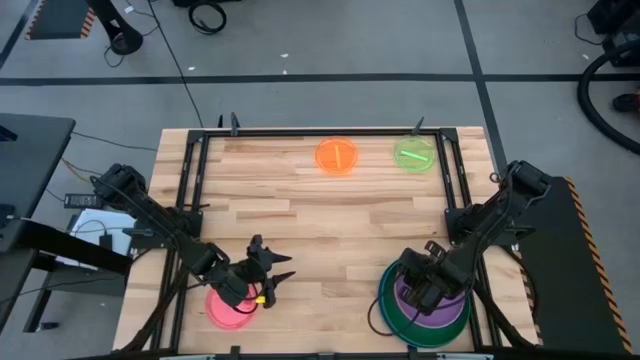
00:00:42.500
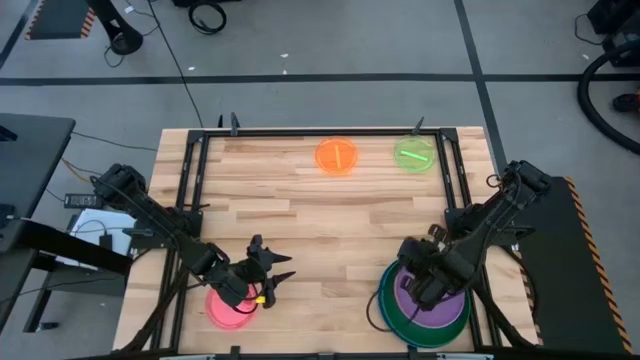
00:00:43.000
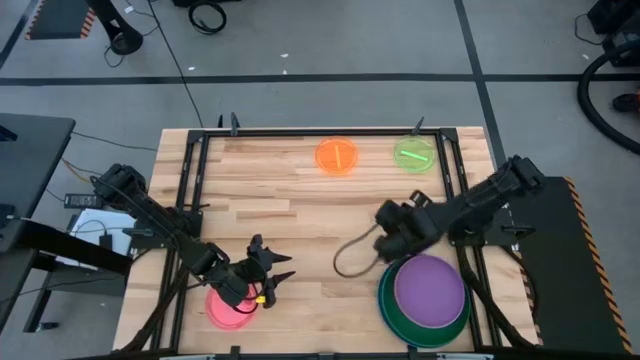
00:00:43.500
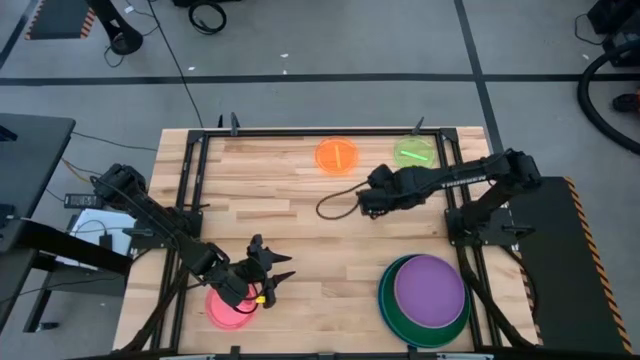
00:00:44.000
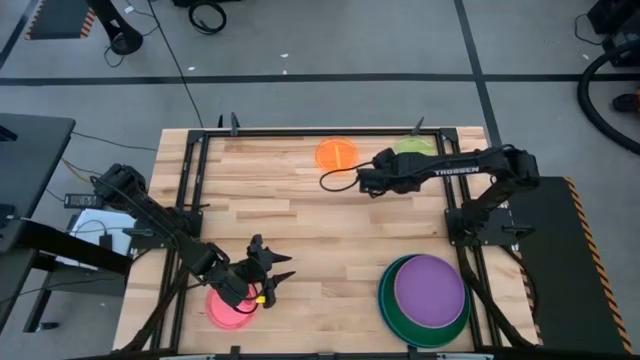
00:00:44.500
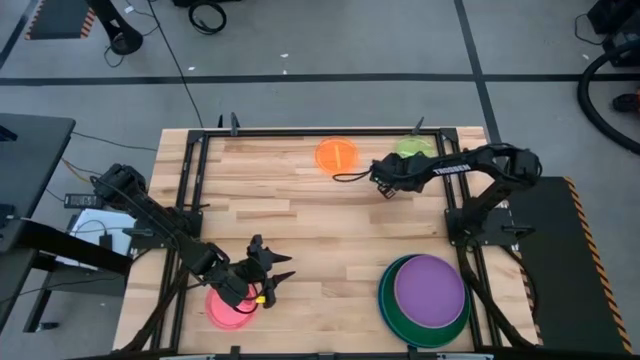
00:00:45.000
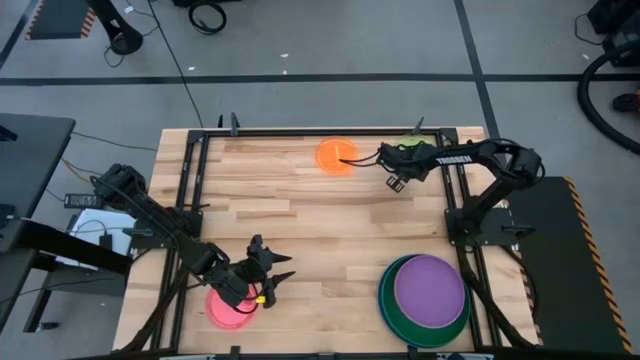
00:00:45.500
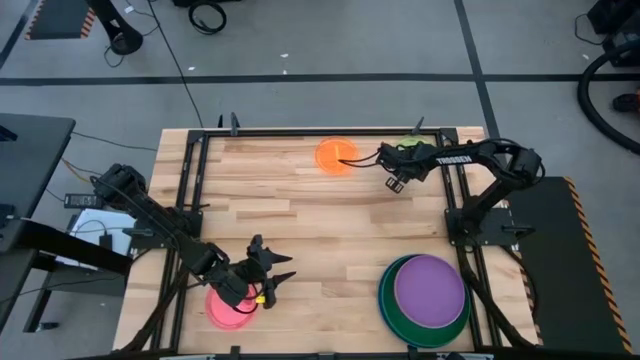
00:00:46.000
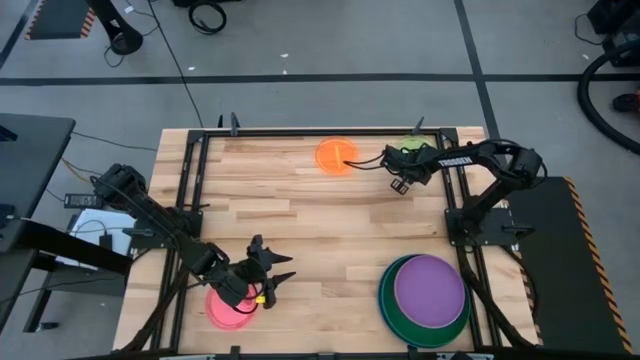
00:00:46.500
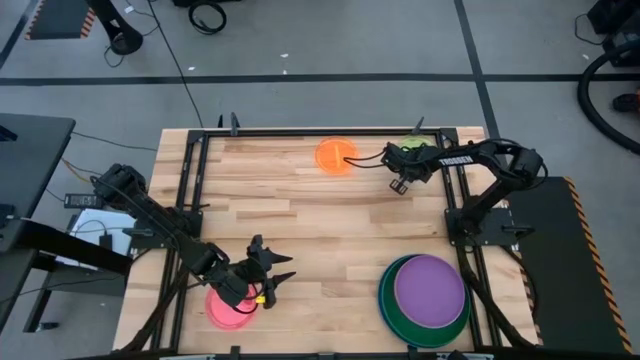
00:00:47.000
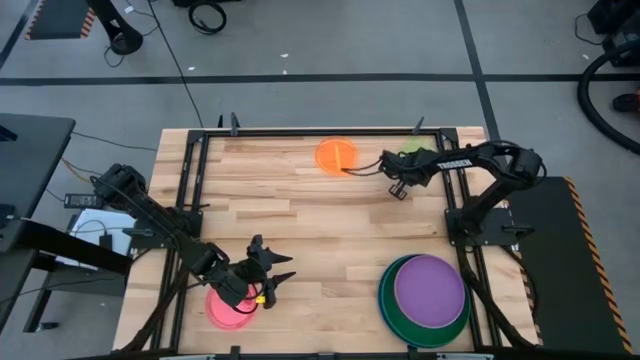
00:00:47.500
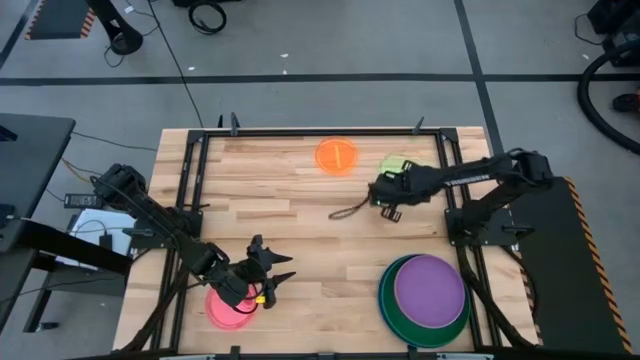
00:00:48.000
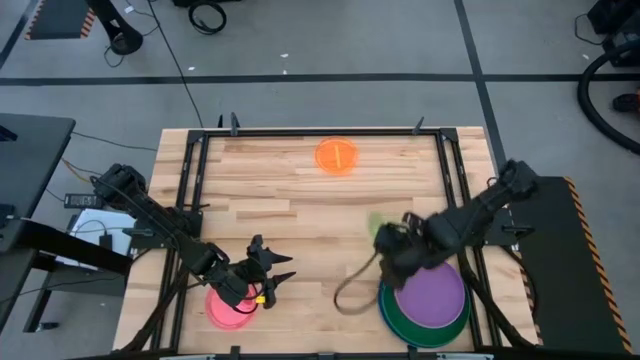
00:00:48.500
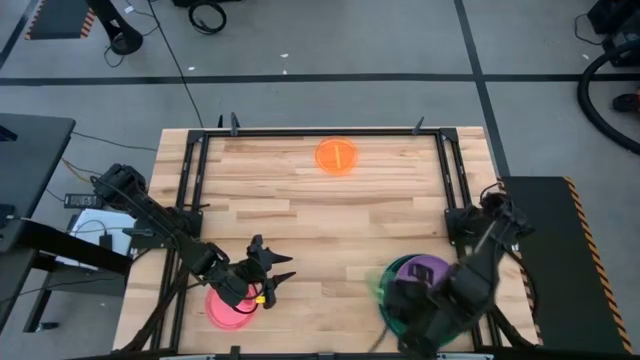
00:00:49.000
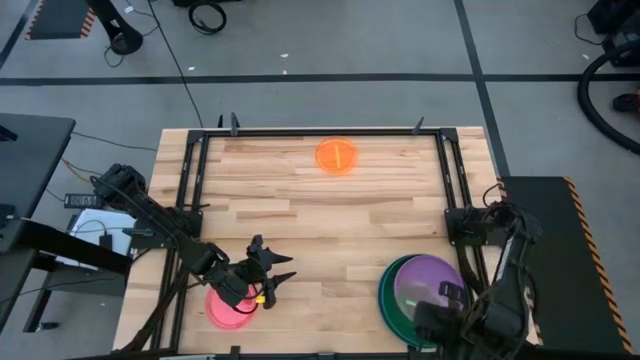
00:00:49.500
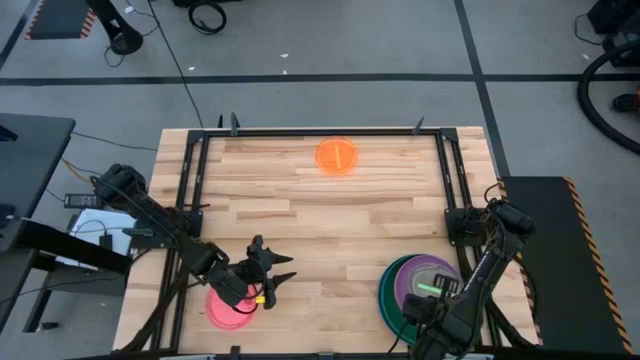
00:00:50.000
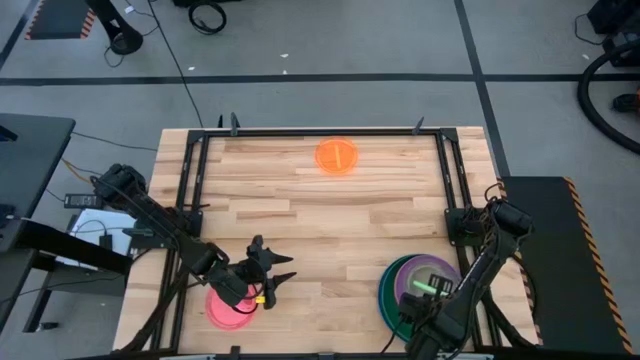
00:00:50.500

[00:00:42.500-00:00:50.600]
Task: Stack plastic plates
Stack the light green plate on top of the purple plate

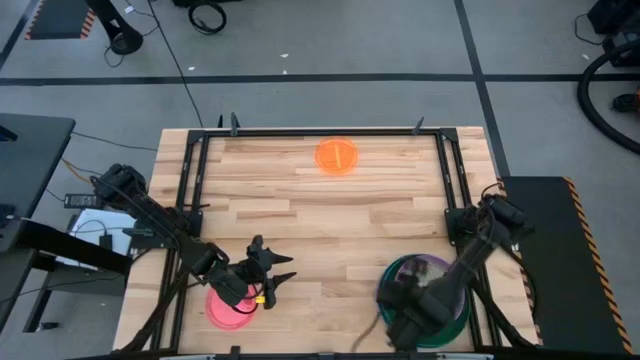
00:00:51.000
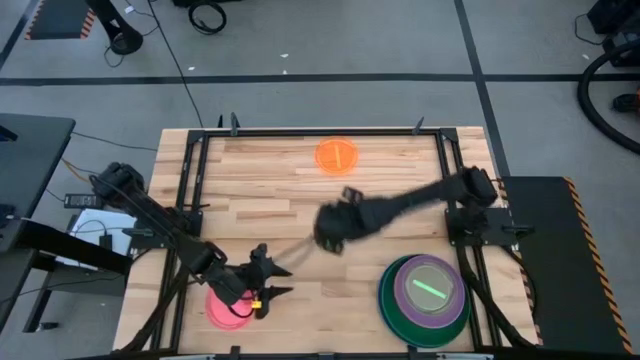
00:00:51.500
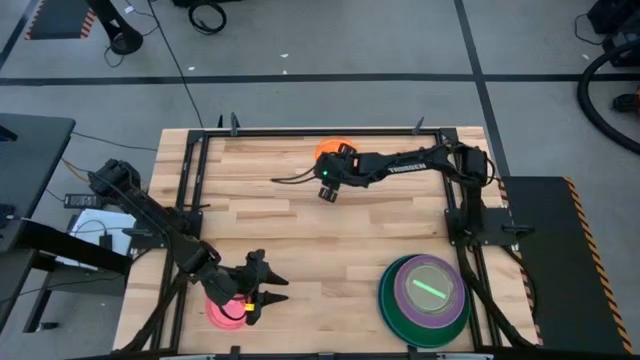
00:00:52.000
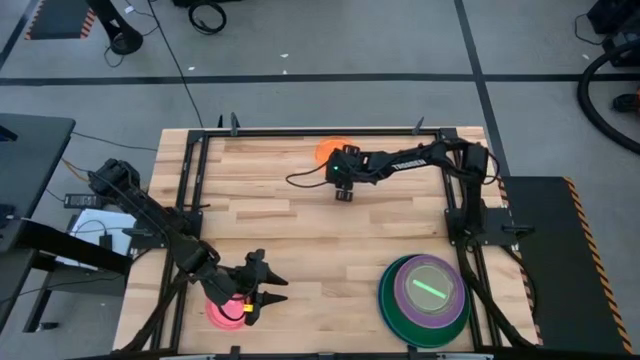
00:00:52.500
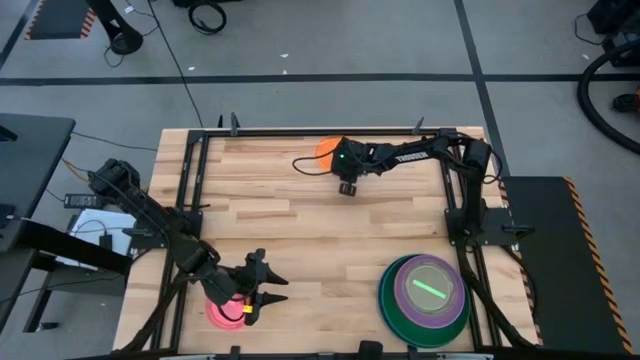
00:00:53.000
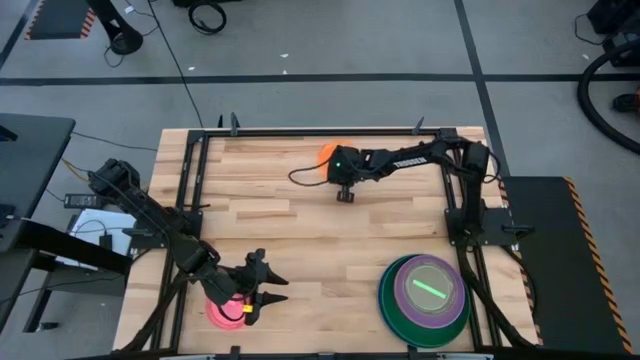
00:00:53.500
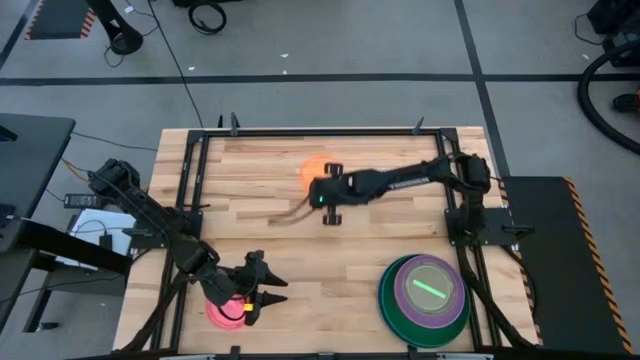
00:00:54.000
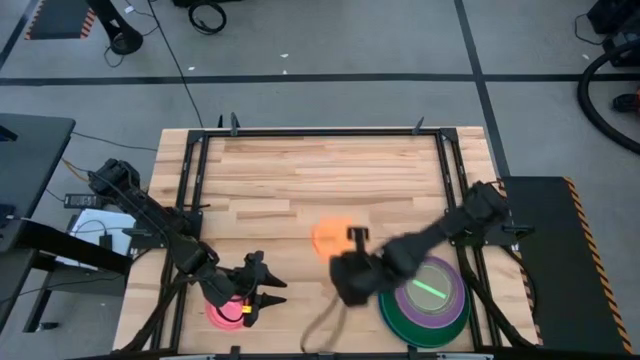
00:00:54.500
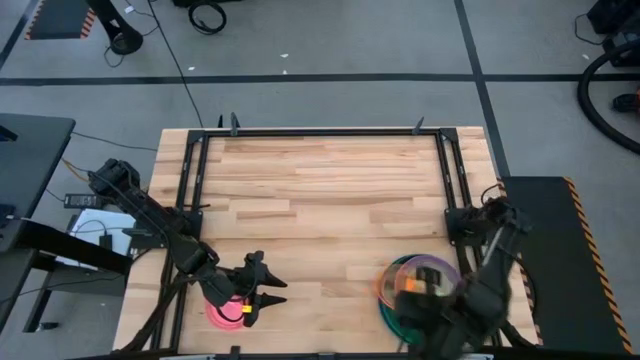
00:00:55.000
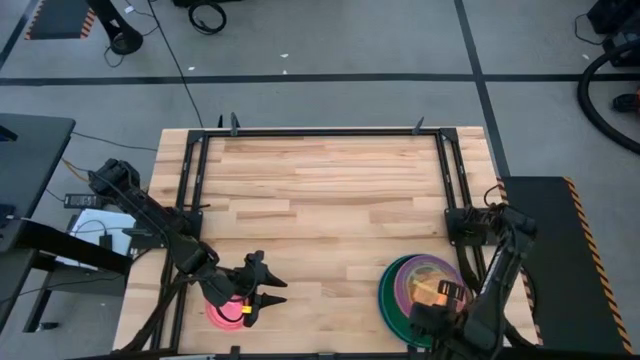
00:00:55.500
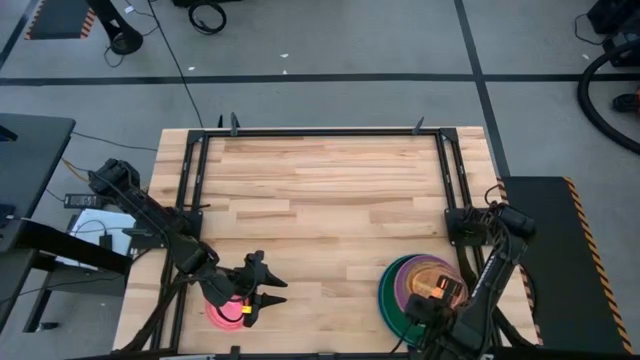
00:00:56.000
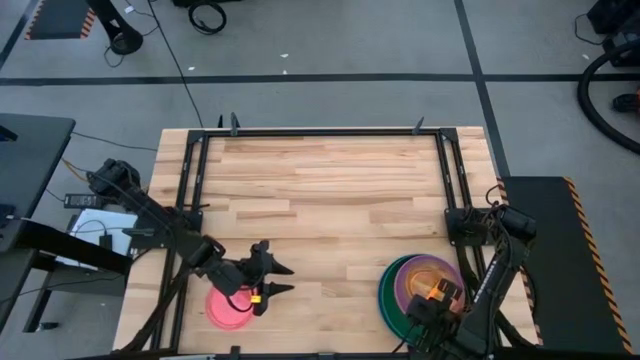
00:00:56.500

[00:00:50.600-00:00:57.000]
Stack the light orange plate on top of the light green plate

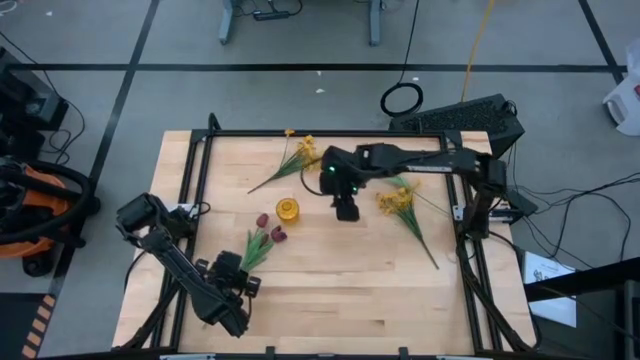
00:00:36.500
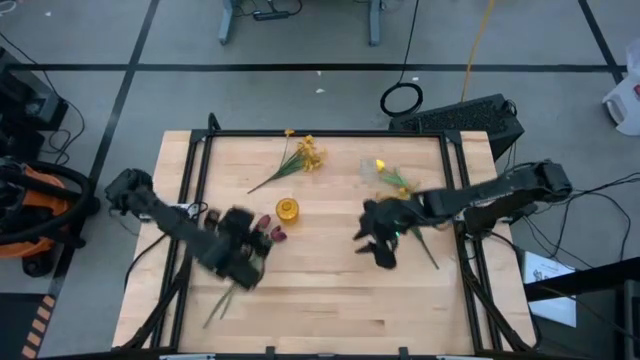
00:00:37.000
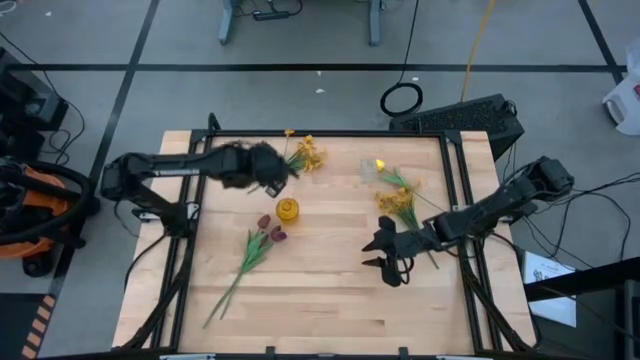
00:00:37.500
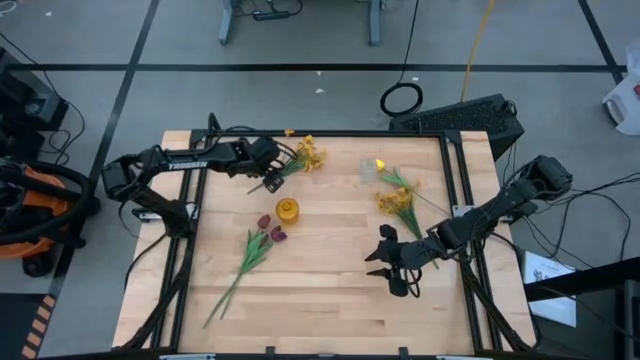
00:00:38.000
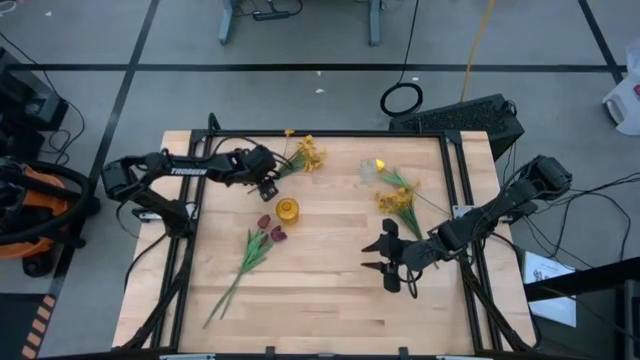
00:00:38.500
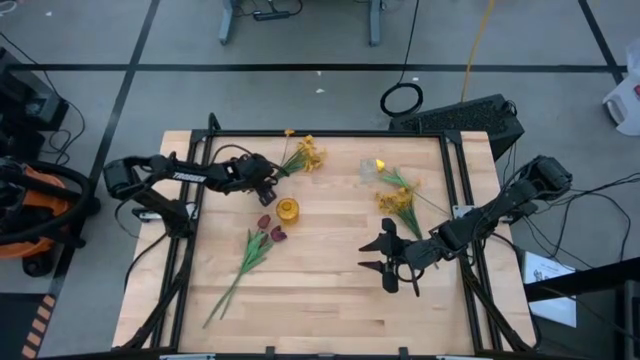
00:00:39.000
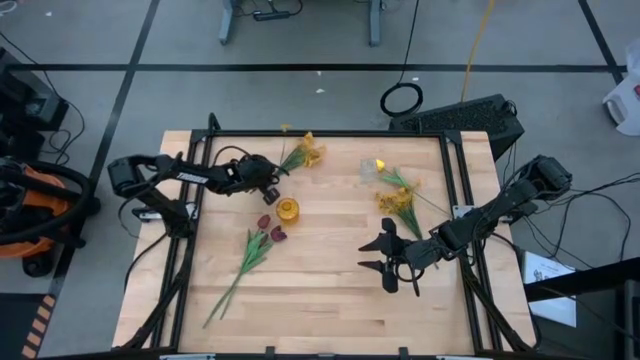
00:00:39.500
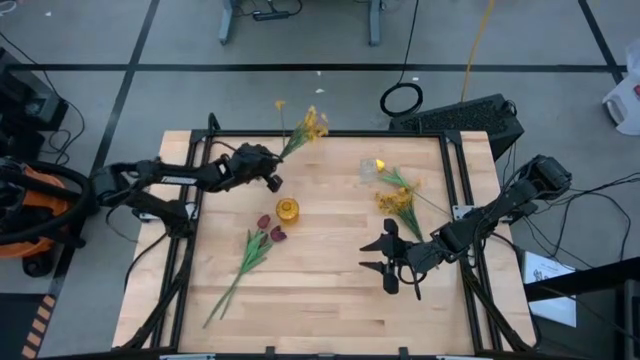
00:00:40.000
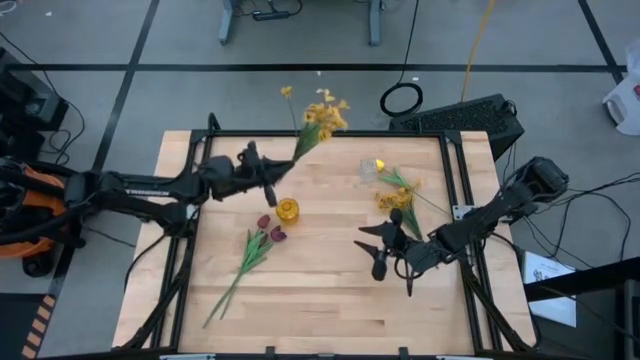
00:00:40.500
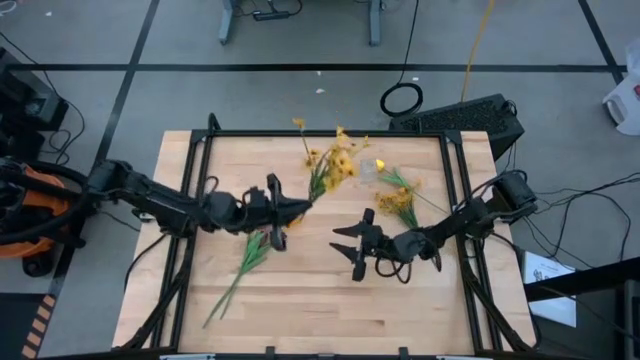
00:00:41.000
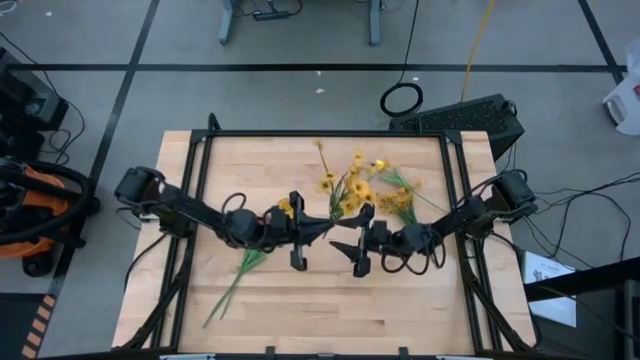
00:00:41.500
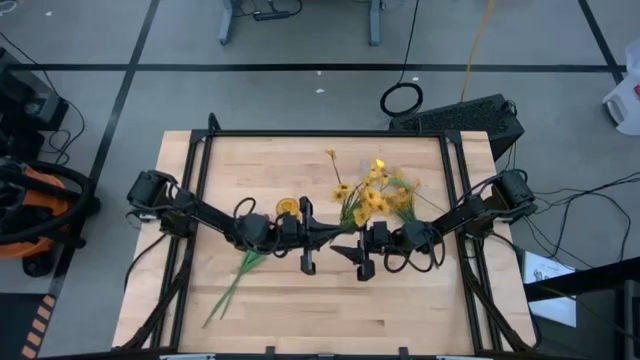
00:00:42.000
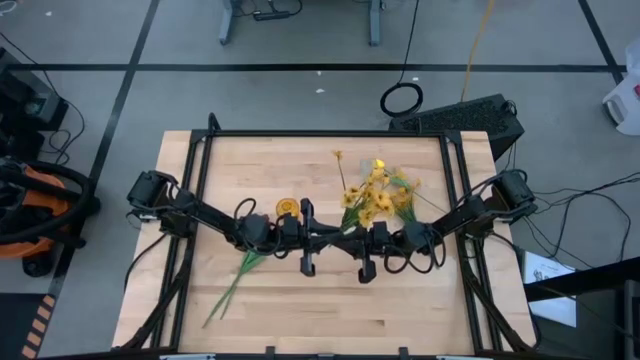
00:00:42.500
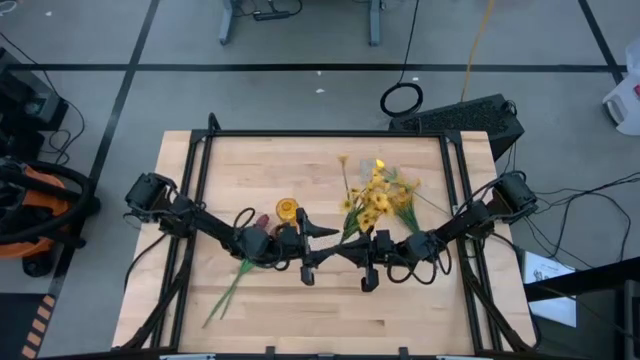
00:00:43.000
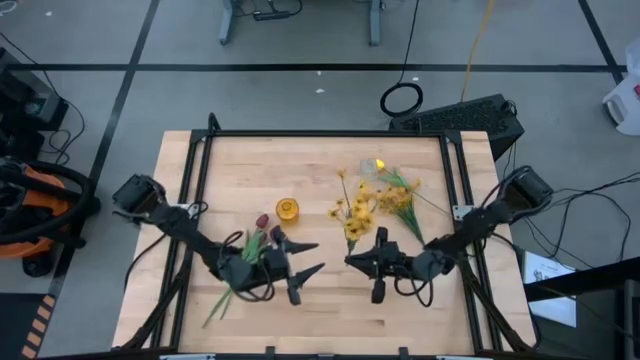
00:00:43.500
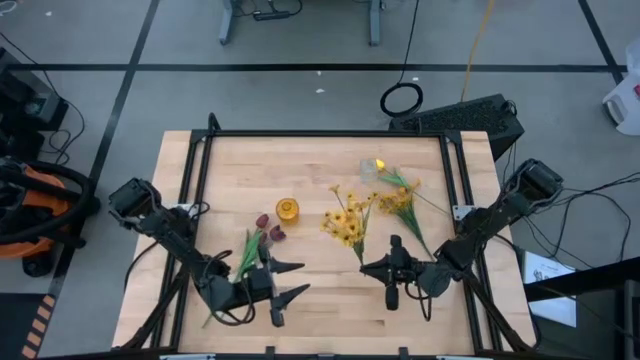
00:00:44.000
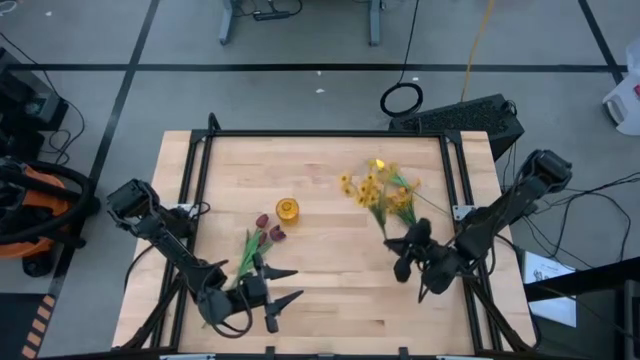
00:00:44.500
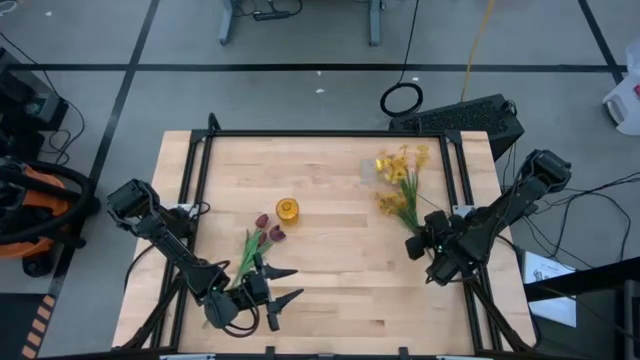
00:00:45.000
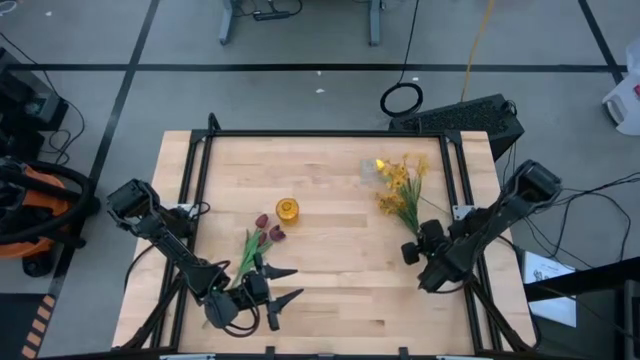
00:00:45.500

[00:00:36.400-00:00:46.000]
Task: Sort flowers into vase by color
Move the left yellow flowers to the middle right of the table
